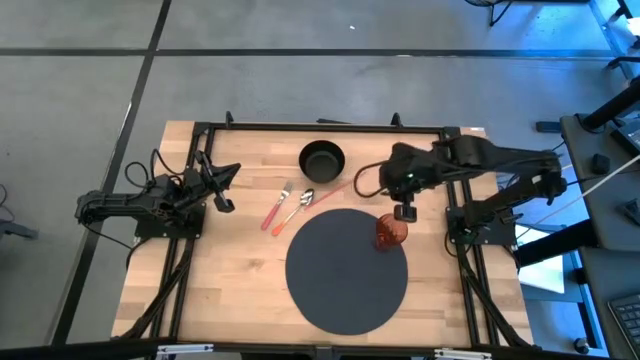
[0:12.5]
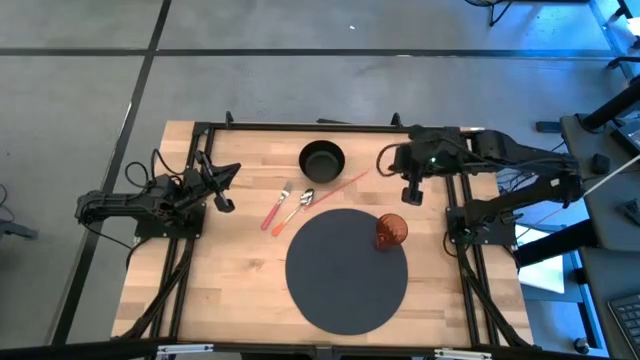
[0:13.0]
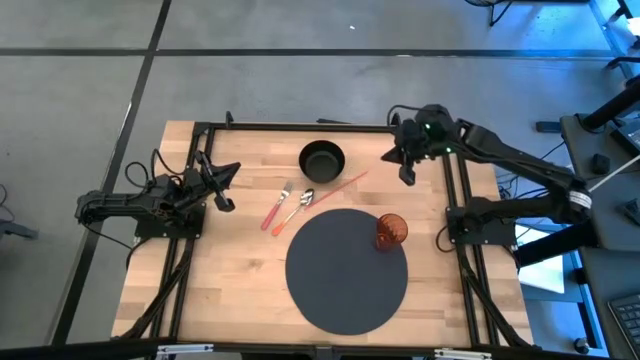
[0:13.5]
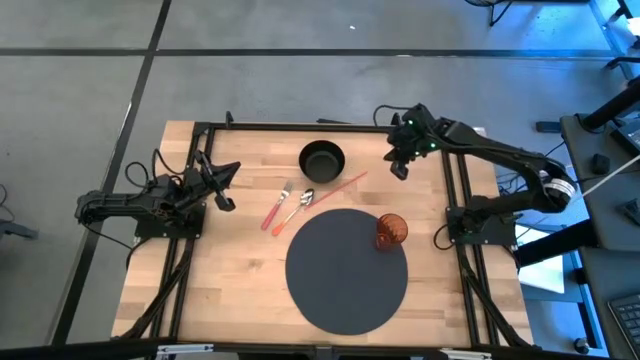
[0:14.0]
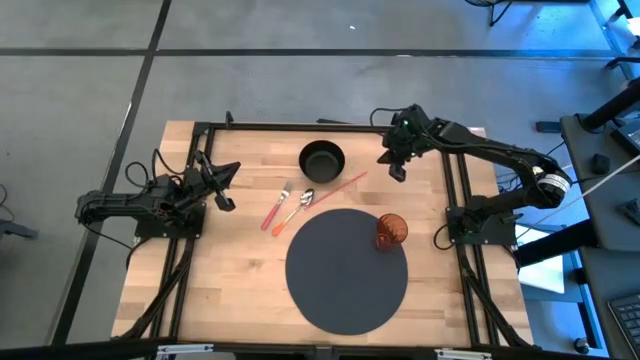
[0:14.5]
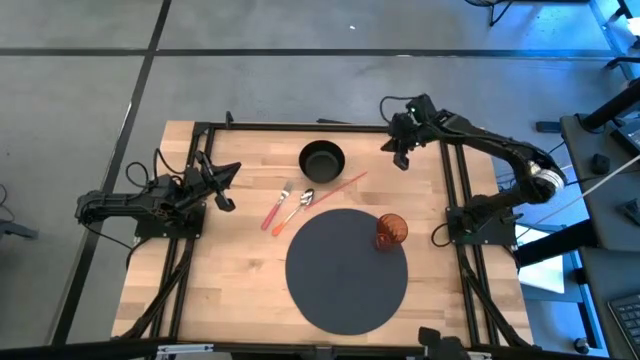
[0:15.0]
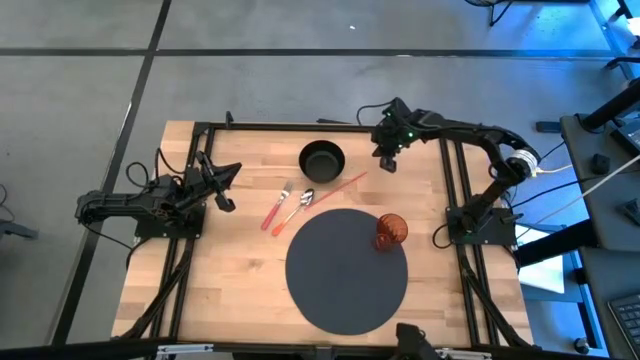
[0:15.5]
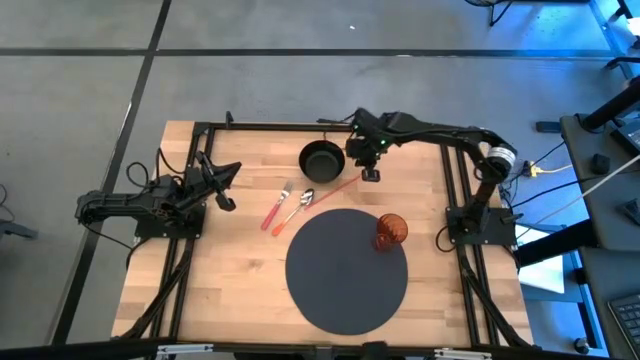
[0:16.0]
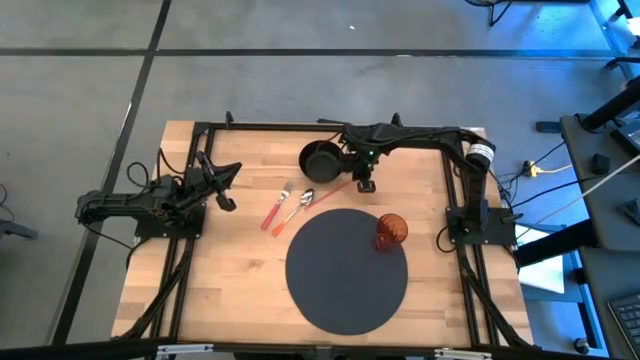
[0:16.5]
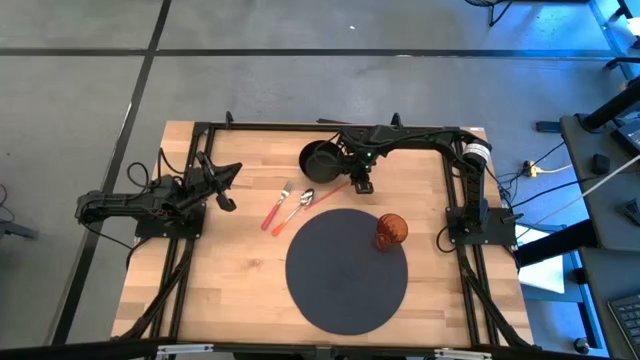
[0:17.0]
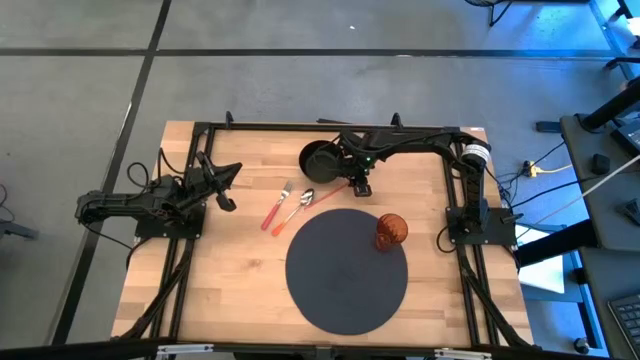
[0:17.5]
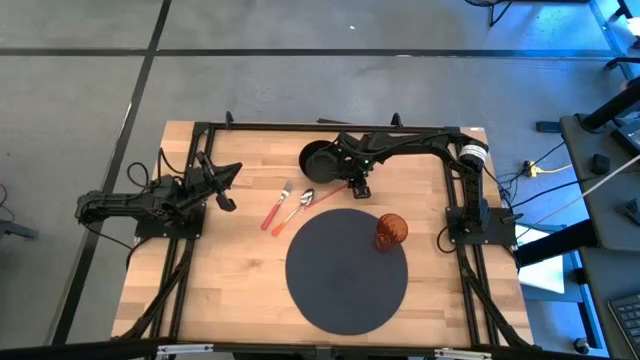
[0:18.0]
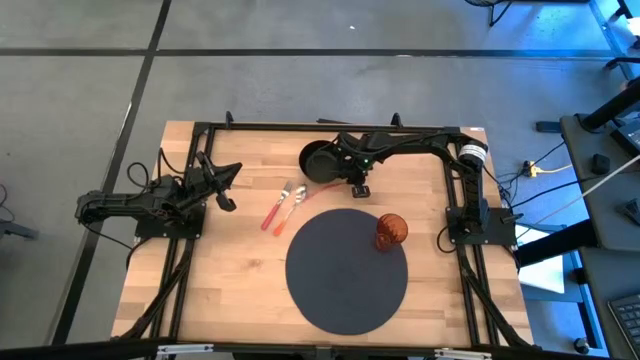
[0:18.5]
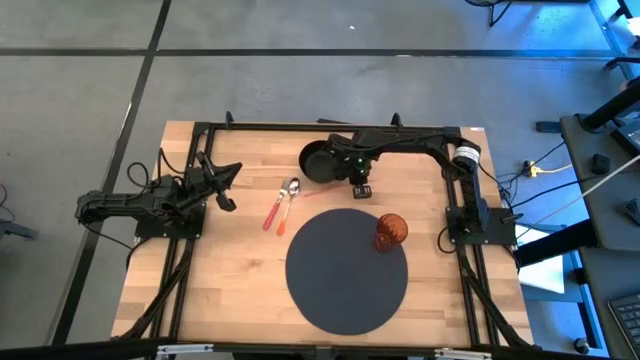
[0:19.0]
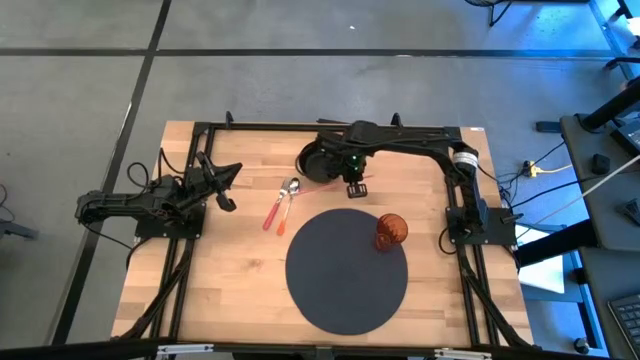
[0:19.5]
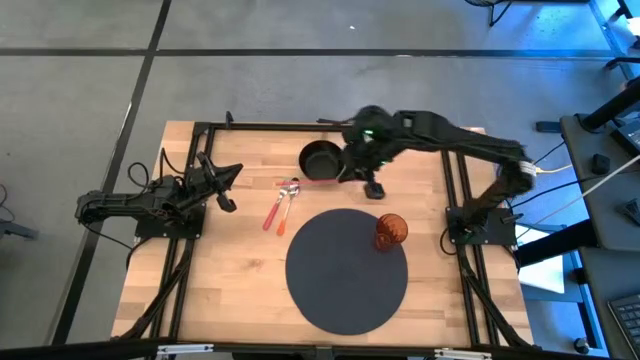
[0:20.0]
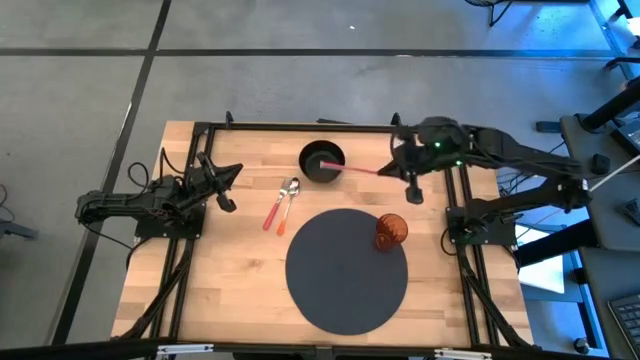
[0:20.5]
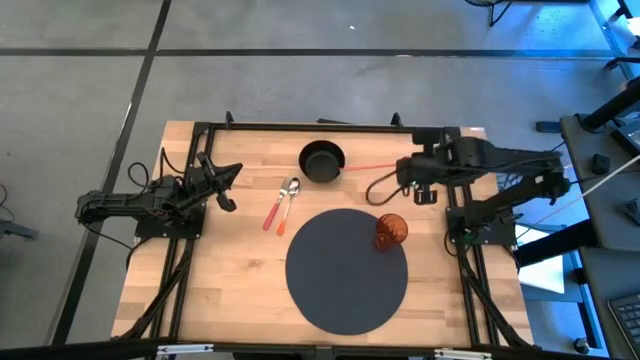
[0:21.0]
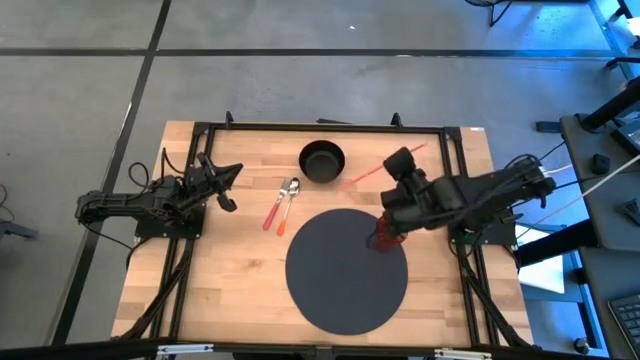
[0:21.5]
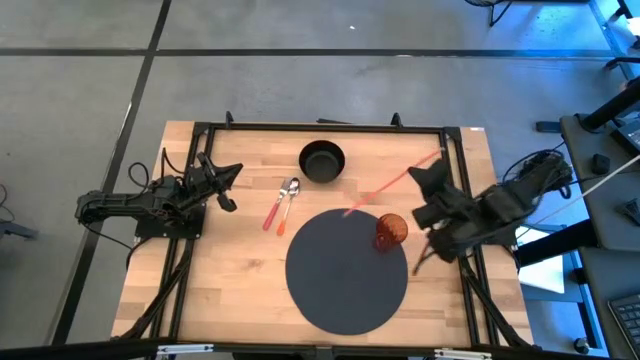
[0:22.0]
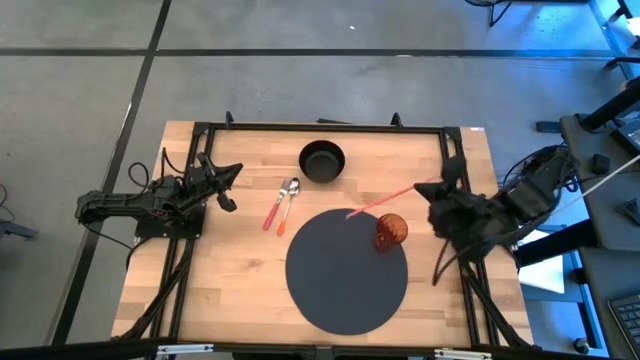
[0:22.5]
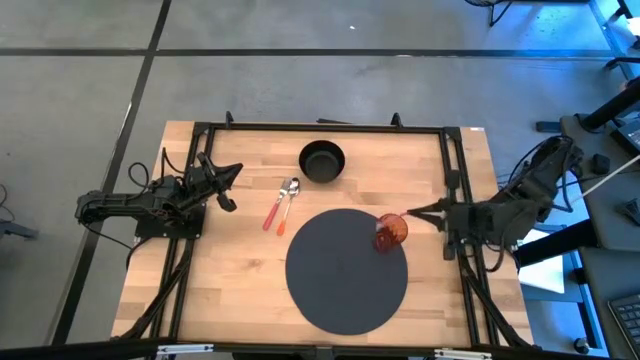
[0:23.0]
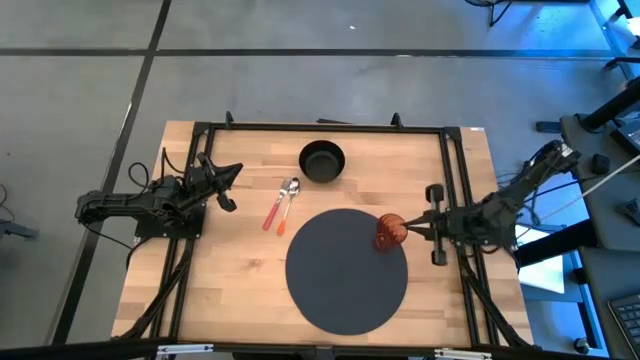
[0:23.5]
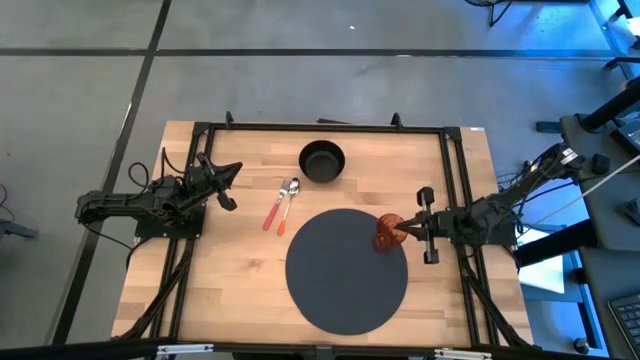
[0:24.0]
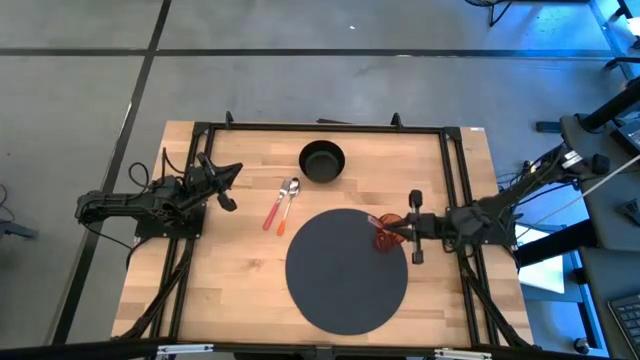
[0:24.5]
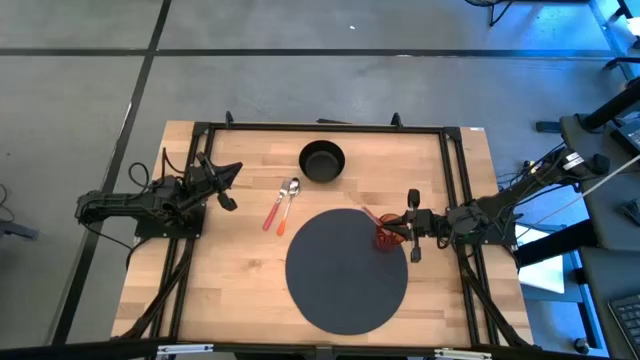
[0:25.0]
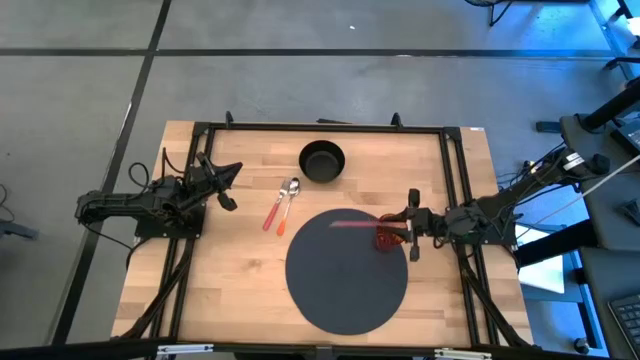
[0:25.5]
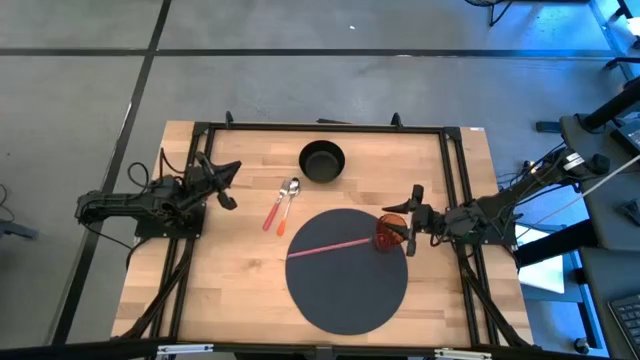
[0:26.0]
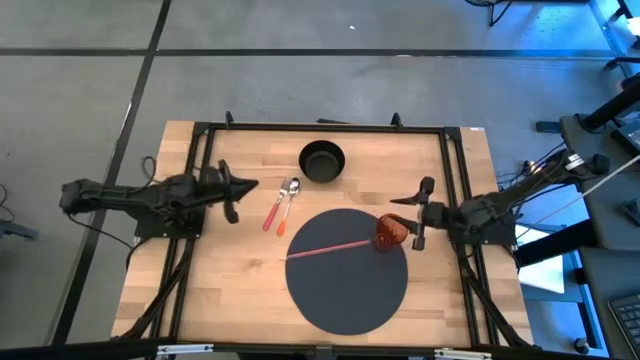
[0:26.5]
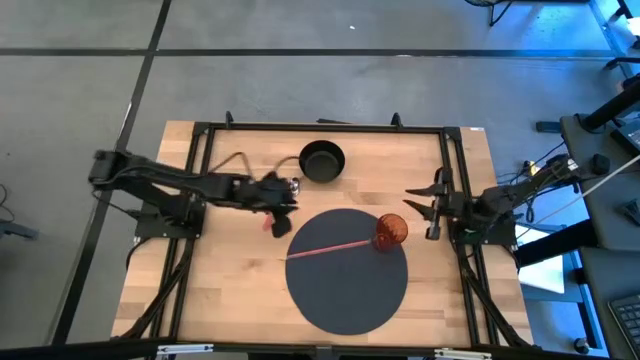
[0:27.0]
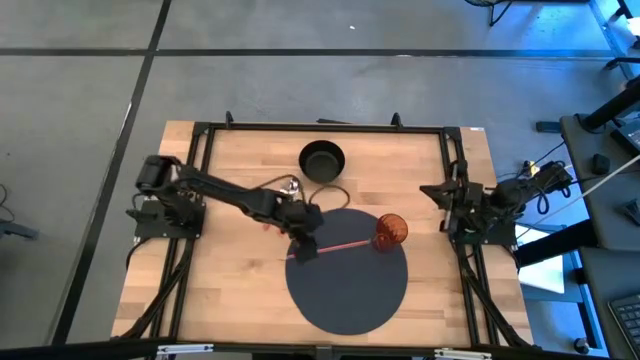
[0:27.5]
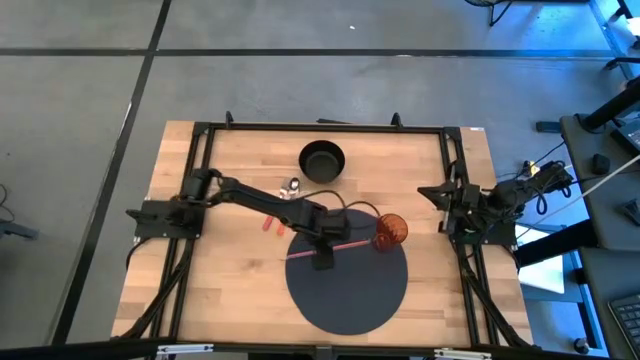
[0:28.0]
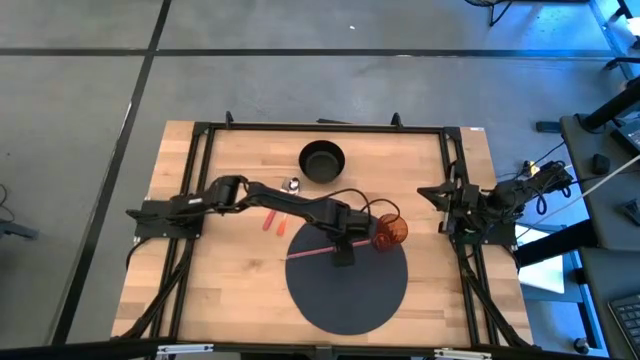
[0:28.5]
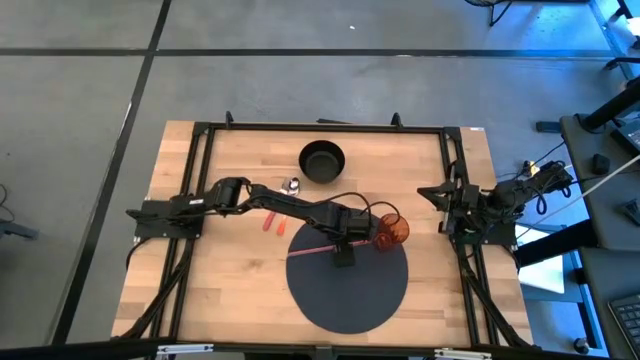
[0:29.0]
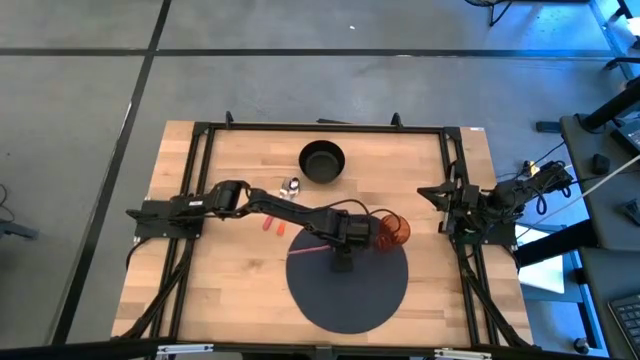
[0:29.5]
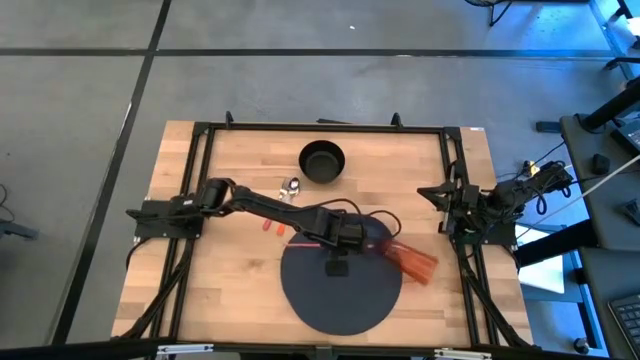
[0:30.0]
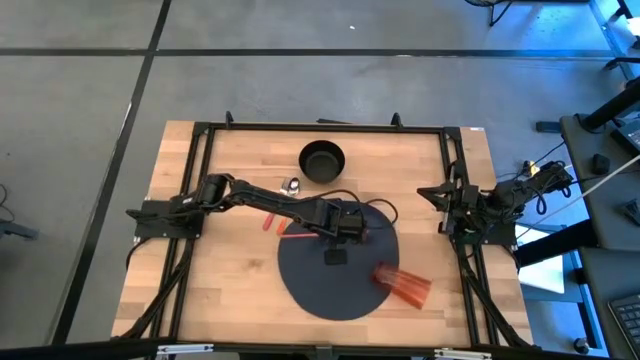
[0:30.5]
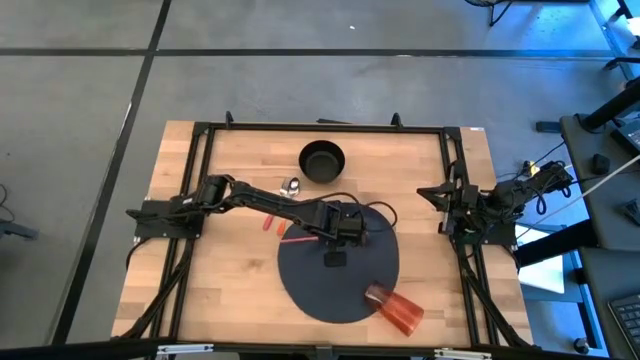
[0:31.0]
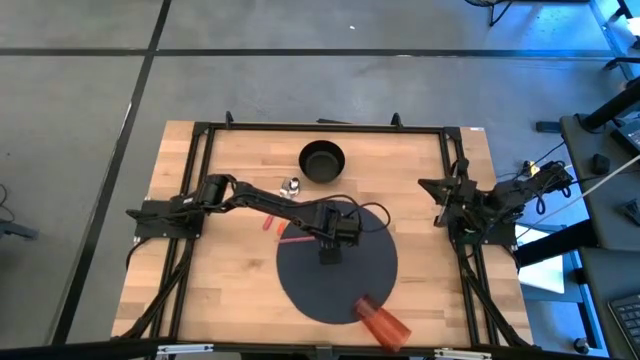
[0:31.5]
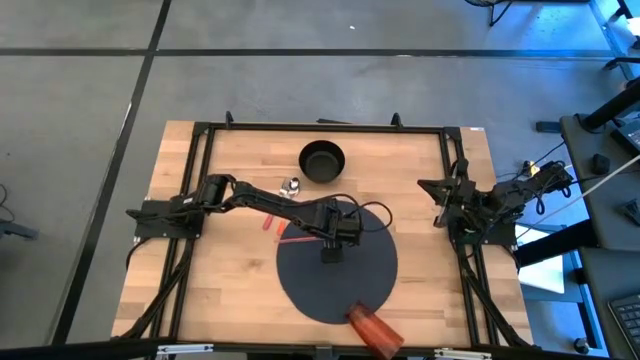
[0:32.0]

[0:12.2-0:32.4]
Task: Pick & Place Utensil
Put the orange straw into the brown glass on the gray mat
